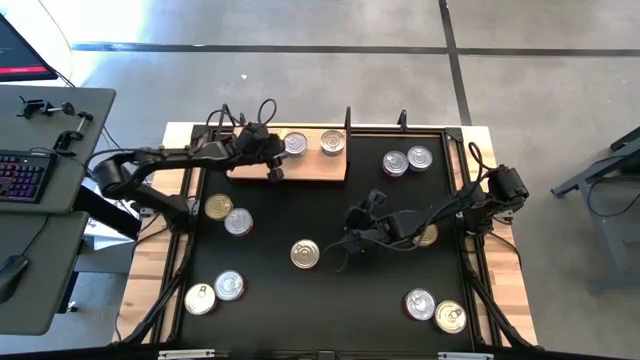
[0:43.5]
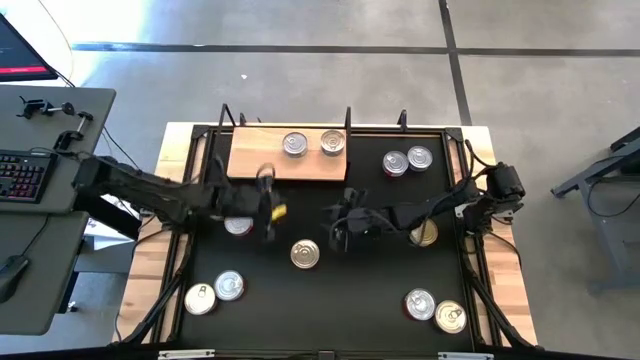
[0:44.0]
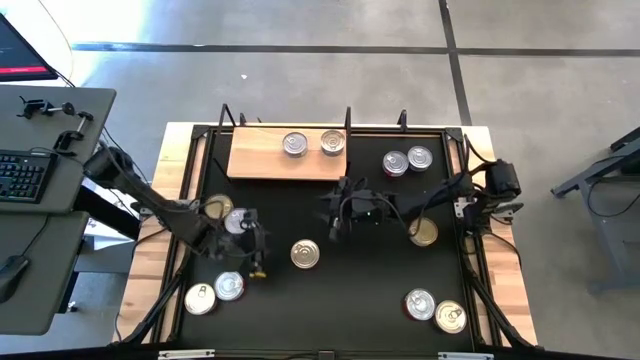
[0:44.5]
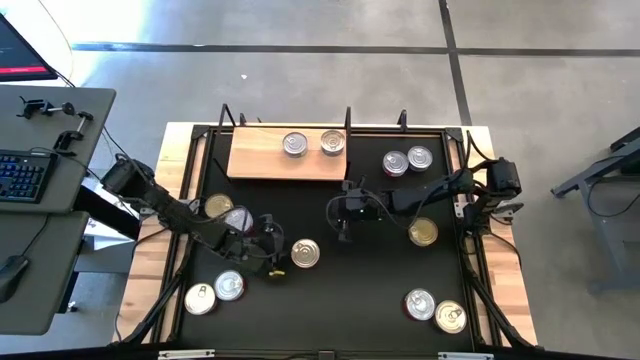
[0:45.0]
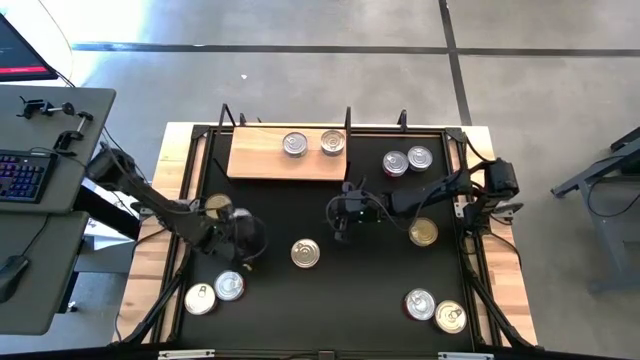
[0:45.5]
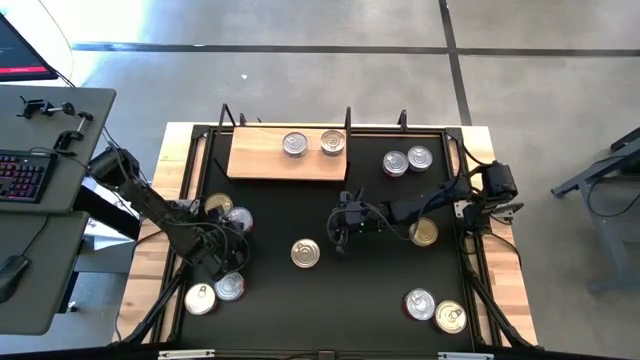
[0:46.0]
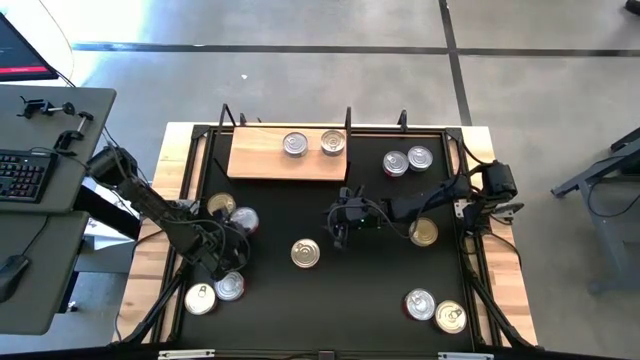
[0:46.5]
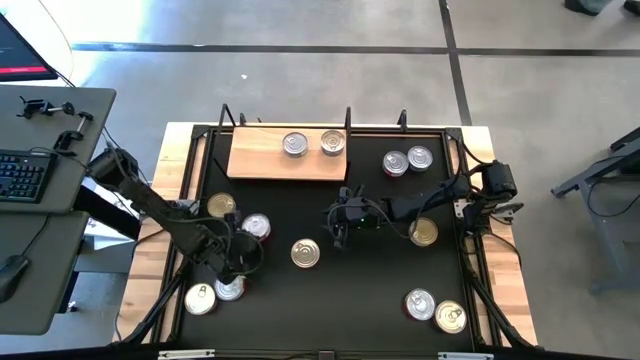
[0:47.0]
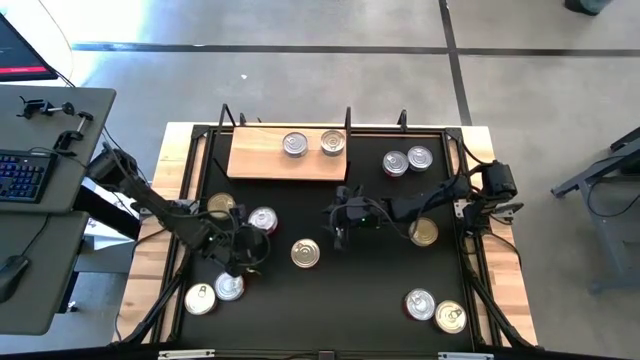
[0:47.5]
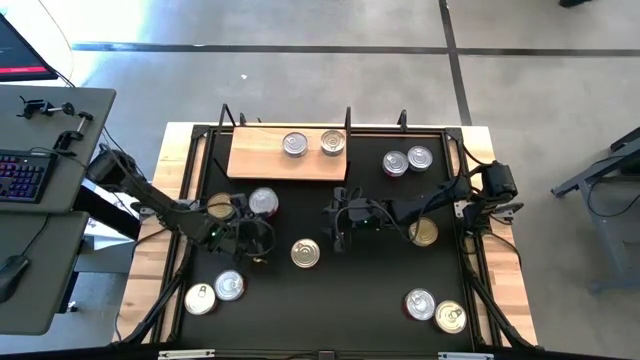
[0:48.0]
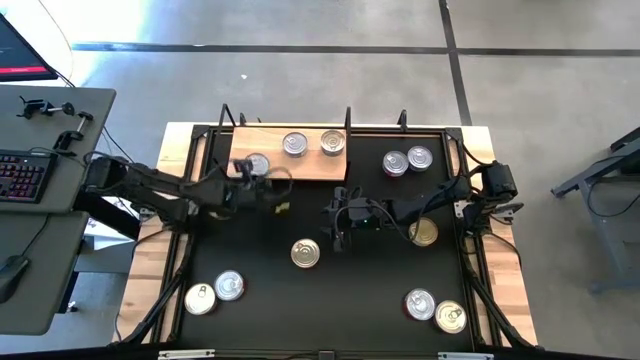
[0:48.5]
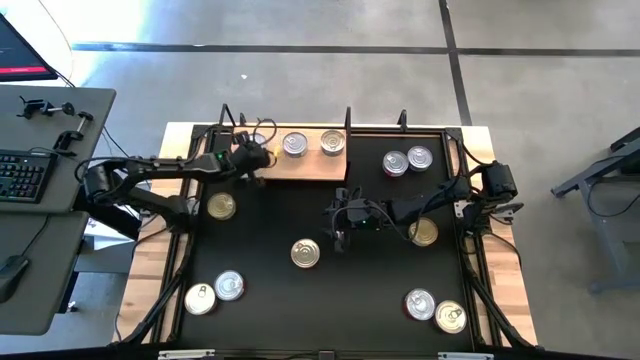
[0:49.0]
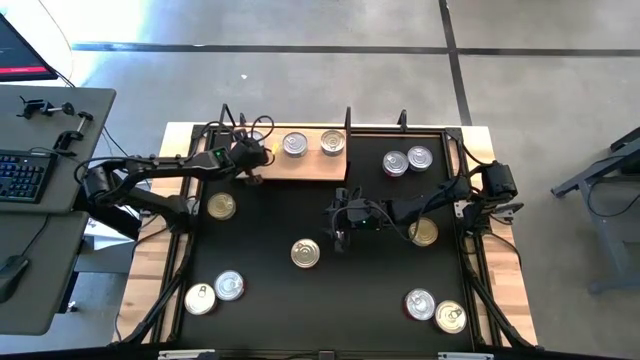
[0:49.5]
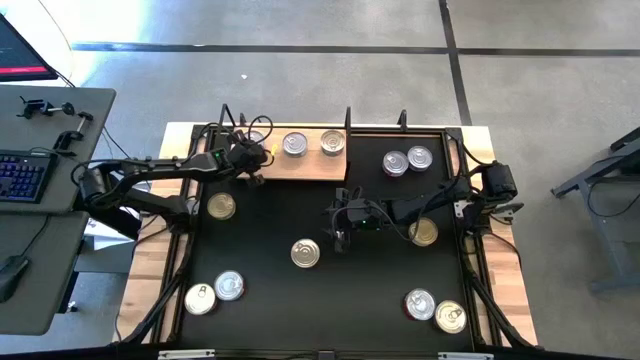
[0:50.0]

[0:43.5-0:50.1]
Task: Stack canned seafood by type on shelf
Put the red tuna can on the shelf

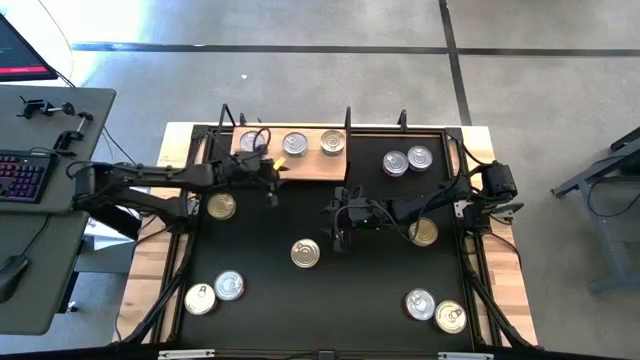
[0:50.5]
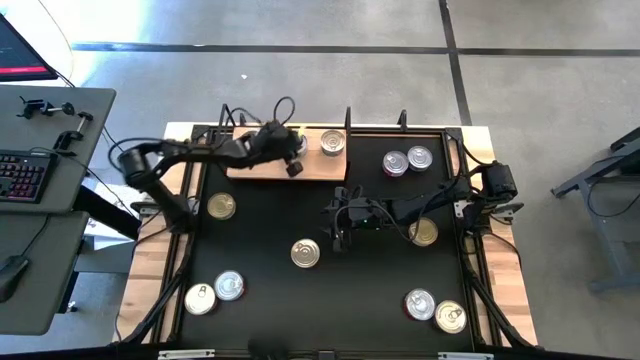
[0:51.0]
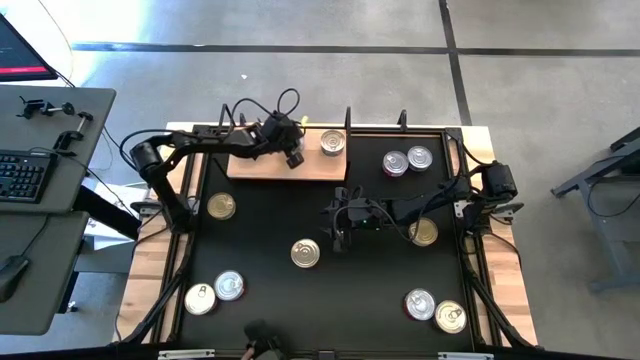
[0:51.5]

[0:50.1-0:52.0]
Adjust the green tuna can on the shelf

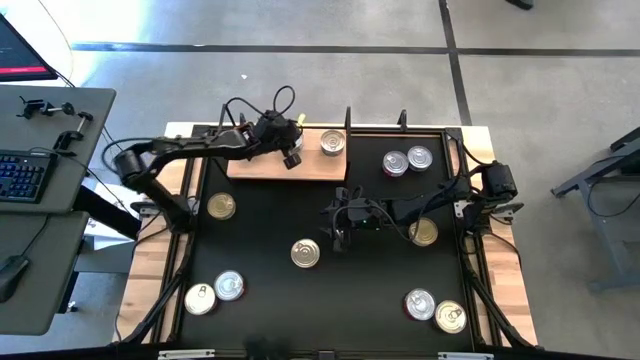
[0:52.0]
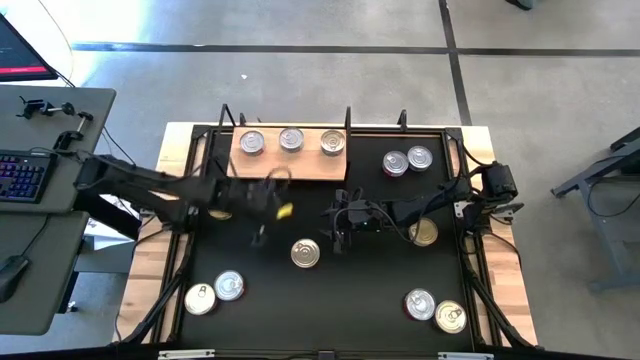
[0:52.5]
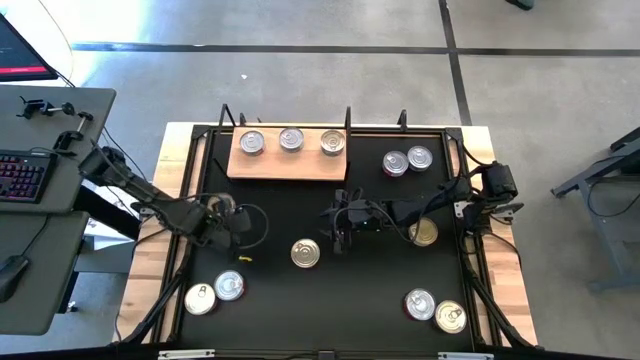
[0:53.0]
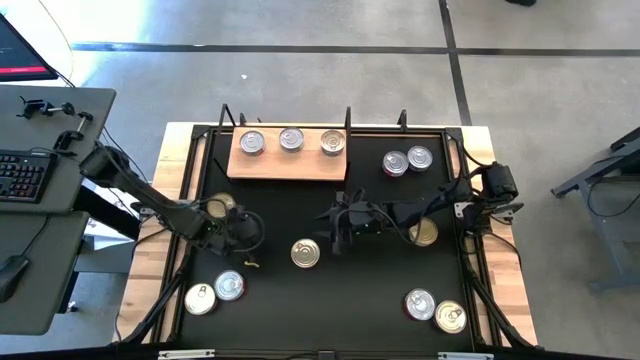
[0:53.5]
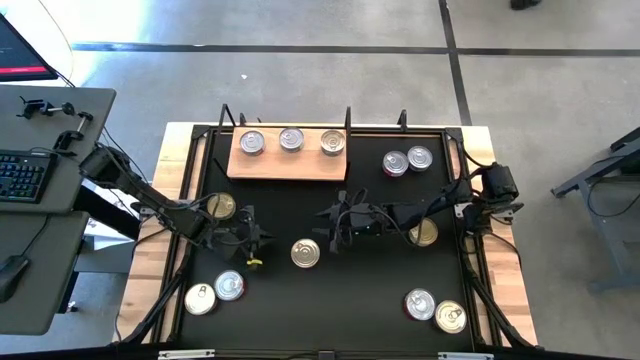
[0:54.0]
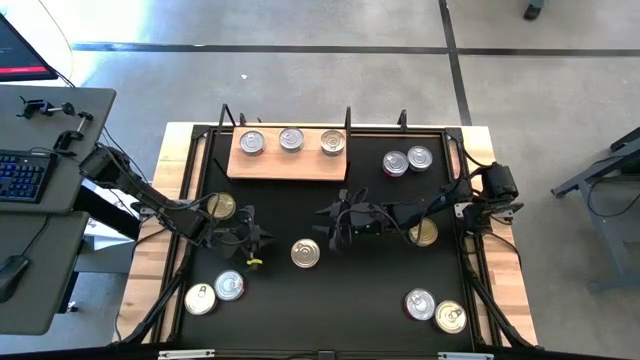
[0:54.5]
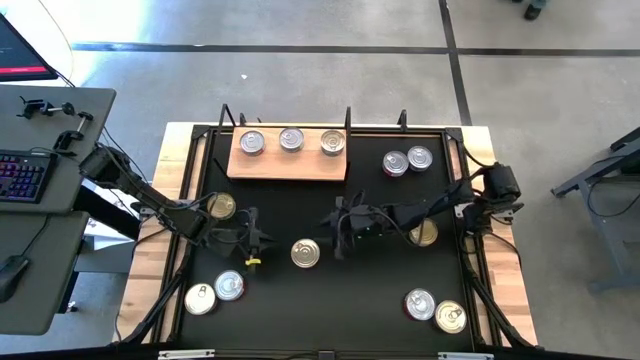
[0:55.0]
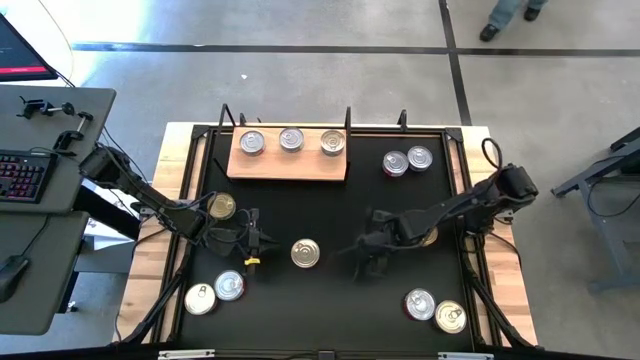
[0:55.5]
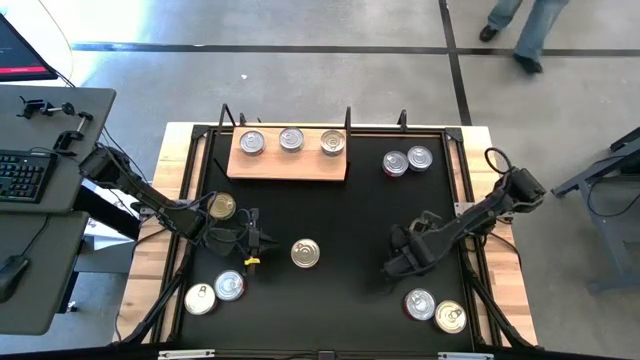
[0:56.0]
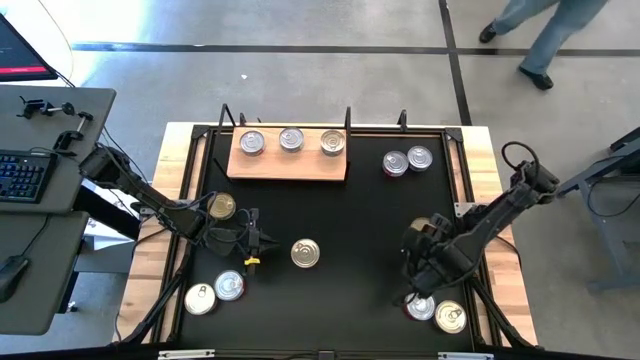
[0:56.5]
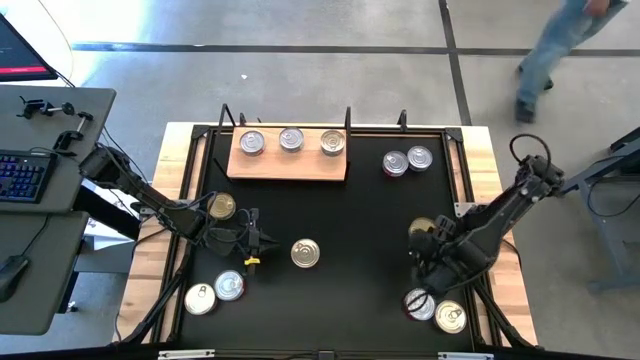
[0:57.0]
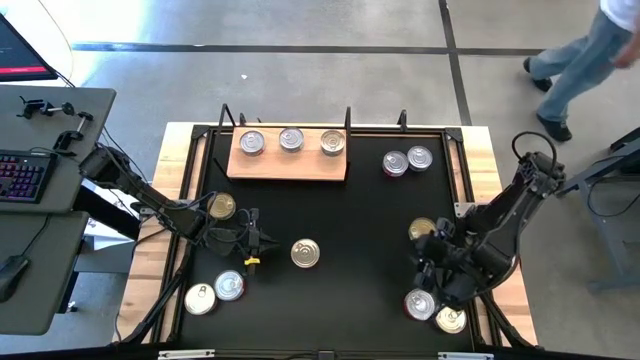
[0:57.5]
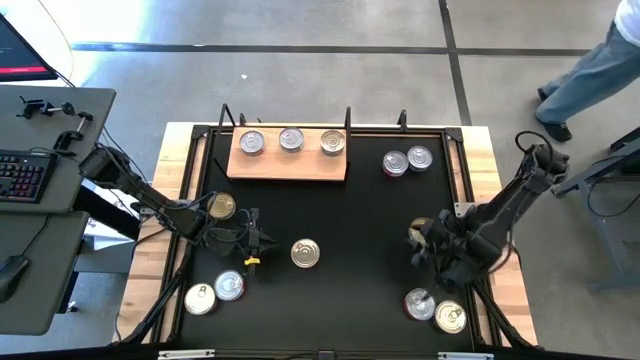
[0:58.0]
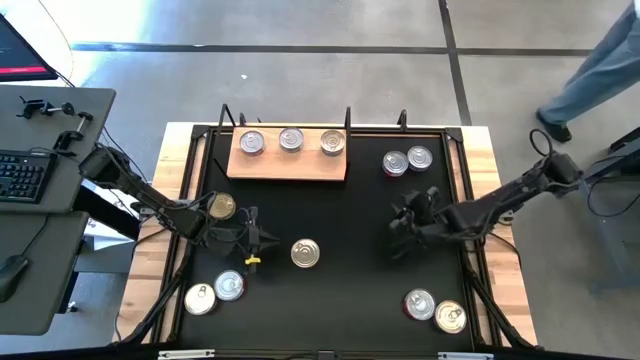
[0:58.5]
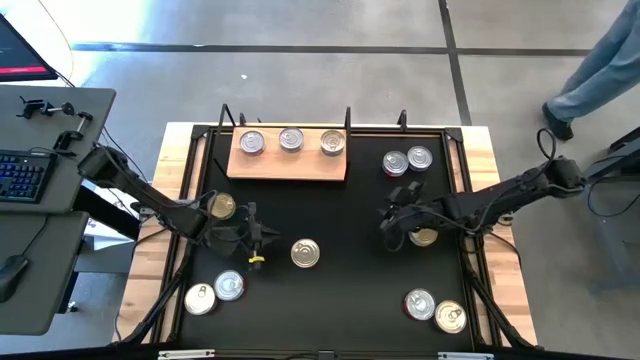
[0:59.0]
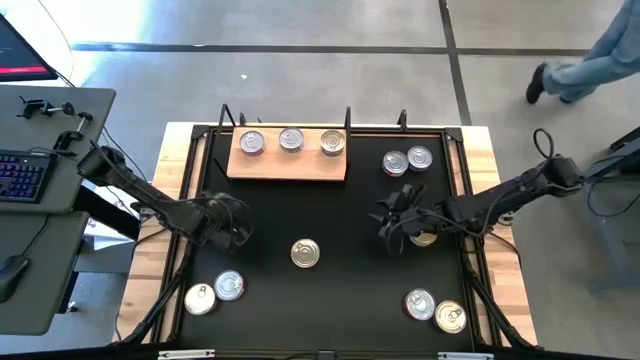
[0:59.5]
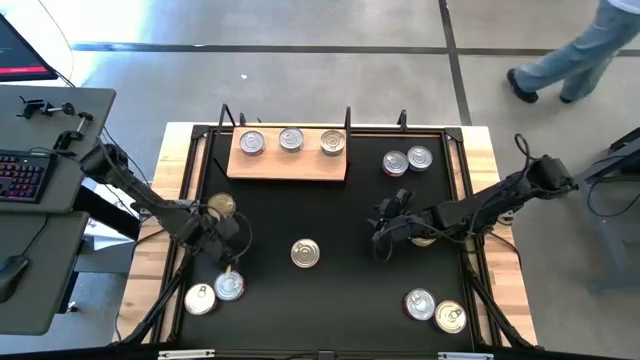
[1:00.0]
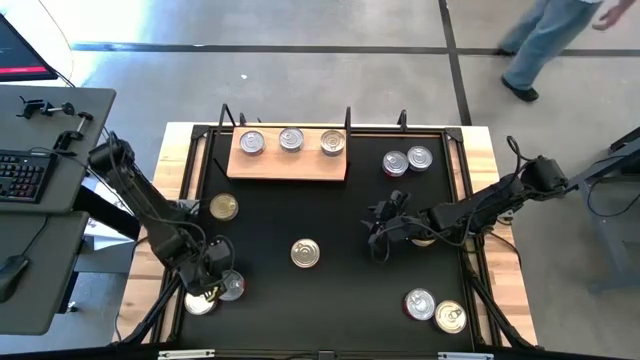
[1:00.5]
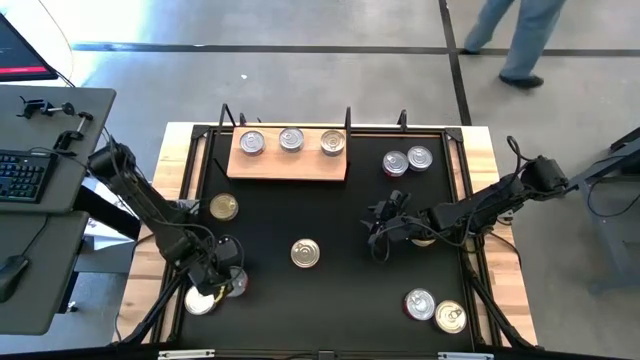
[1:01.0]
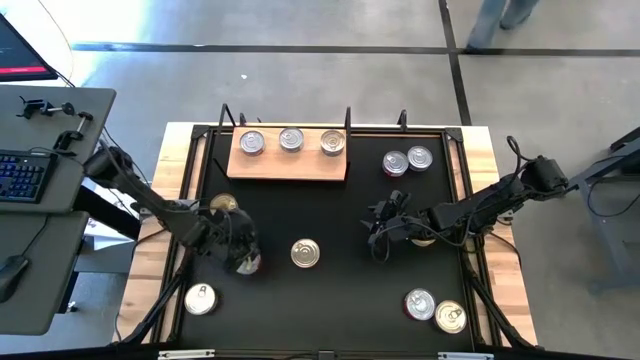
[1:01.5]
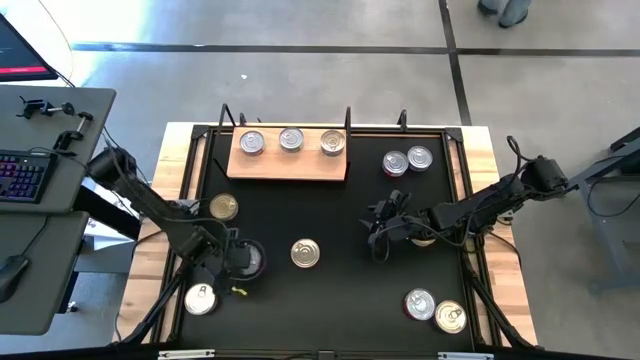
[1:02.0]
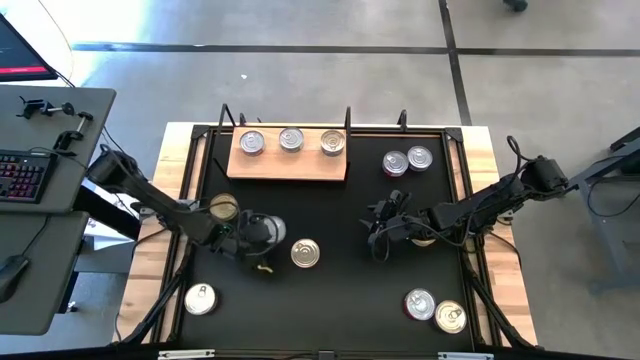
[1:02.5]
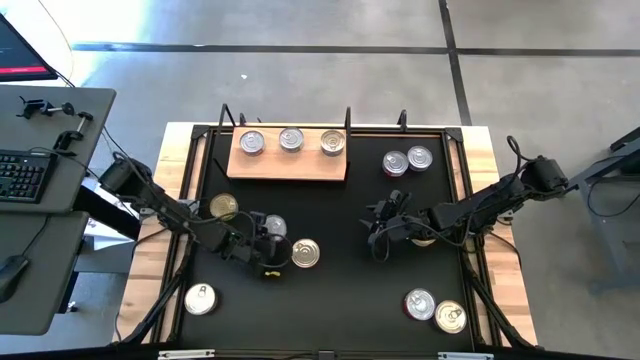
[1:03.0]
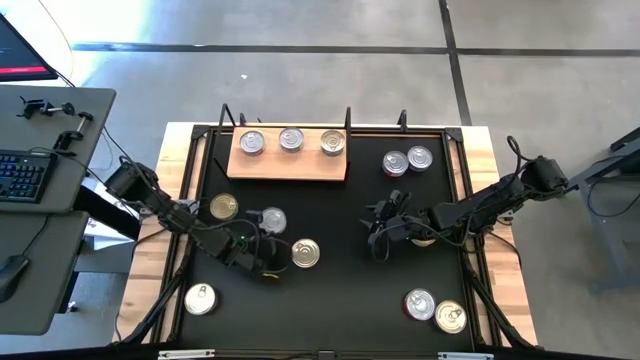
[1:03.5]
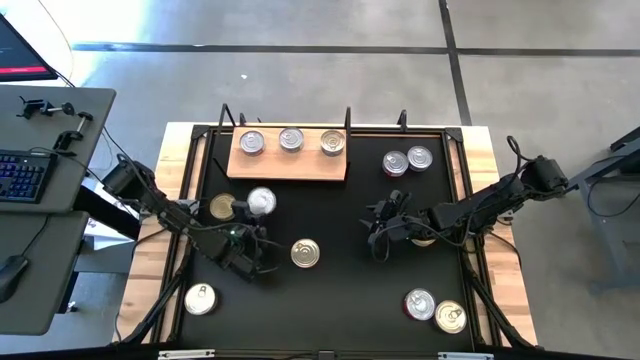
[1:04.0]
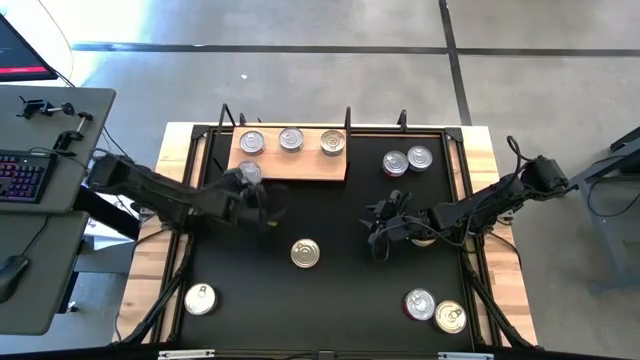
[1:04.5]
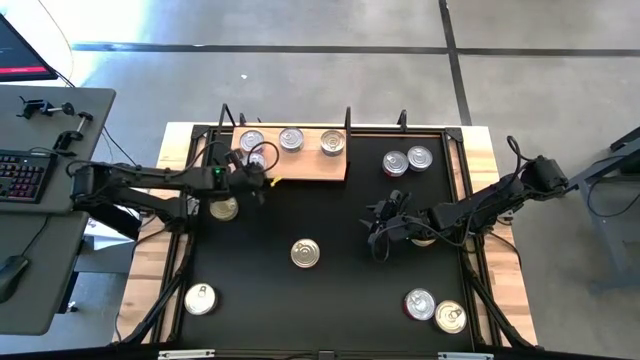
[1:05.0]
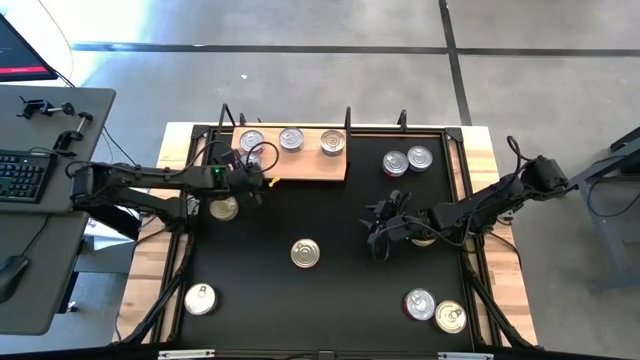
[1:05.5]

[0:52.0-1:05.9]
Put the red tuna can on the shelf aligned with the red tuna can
